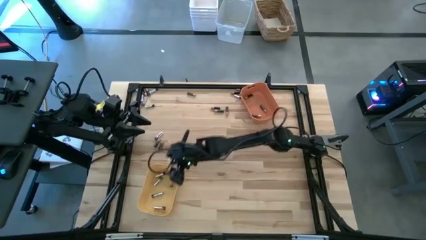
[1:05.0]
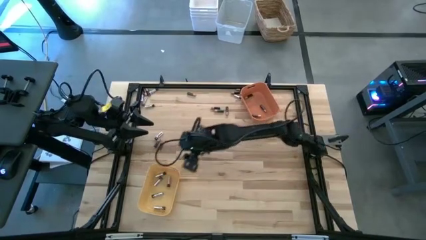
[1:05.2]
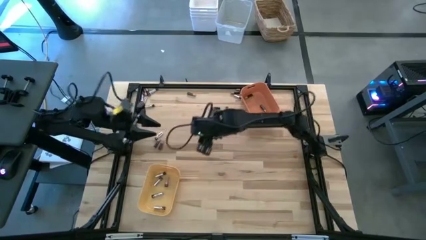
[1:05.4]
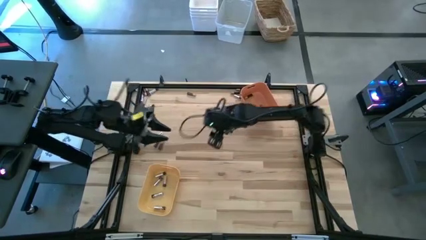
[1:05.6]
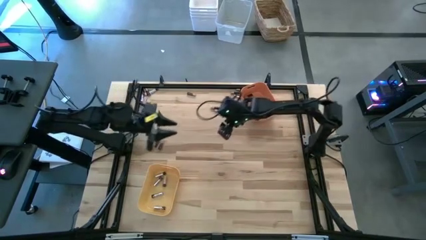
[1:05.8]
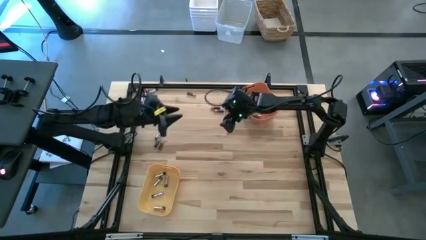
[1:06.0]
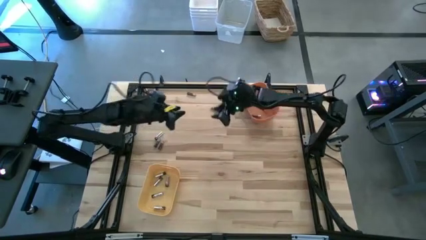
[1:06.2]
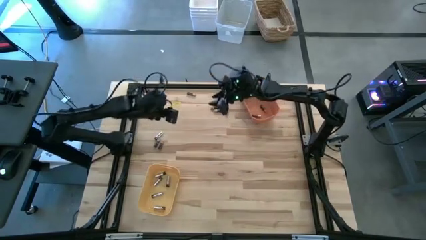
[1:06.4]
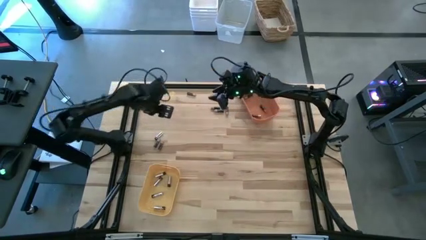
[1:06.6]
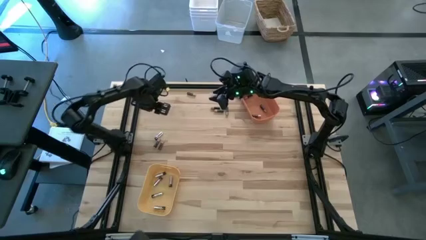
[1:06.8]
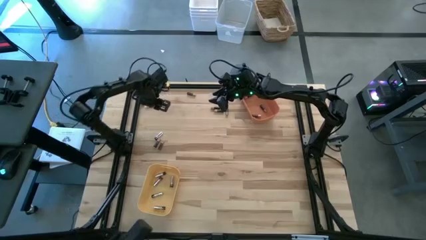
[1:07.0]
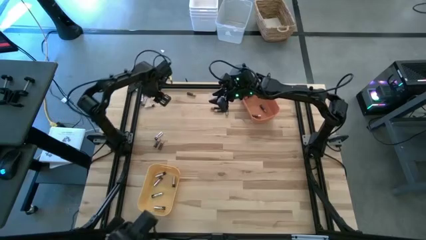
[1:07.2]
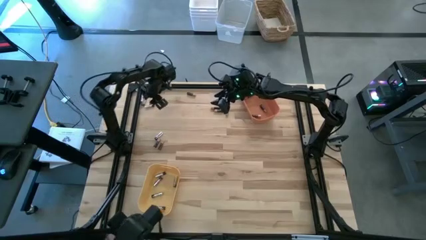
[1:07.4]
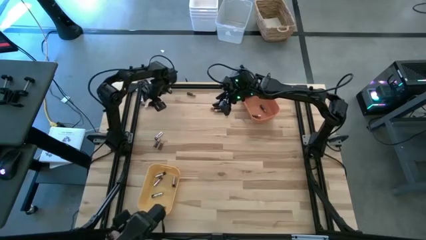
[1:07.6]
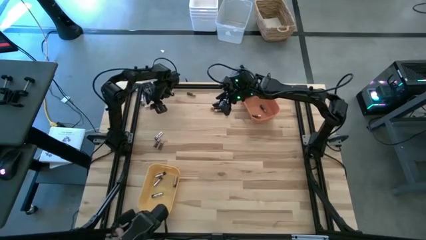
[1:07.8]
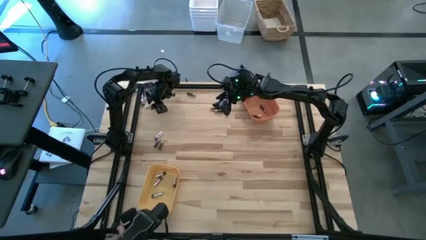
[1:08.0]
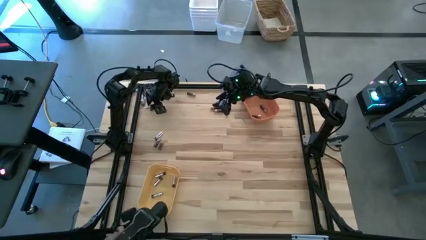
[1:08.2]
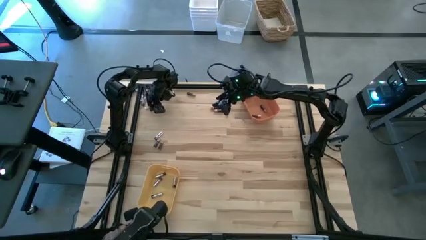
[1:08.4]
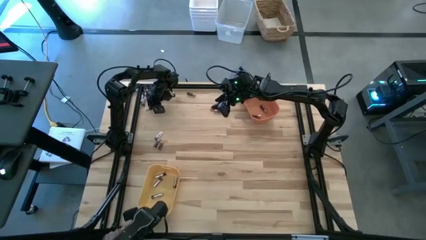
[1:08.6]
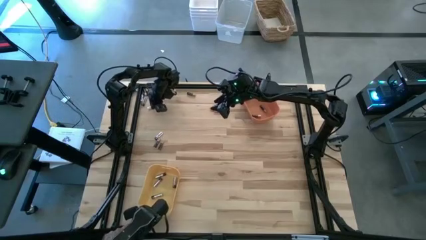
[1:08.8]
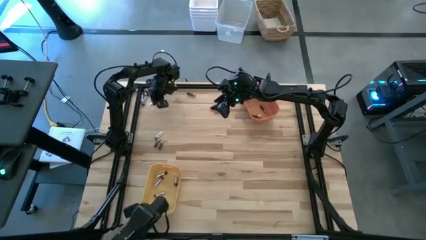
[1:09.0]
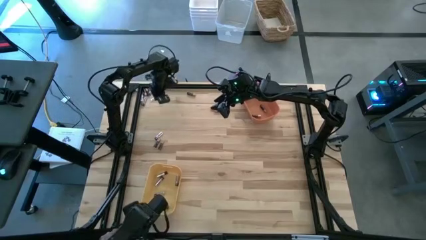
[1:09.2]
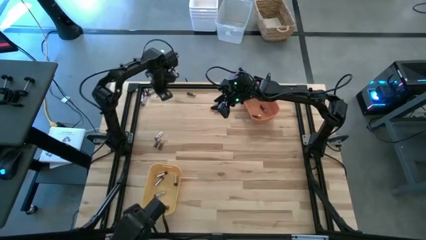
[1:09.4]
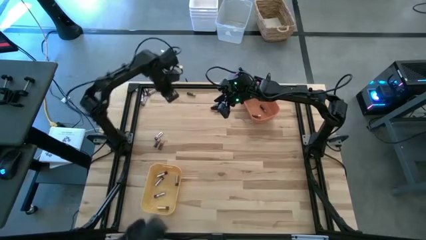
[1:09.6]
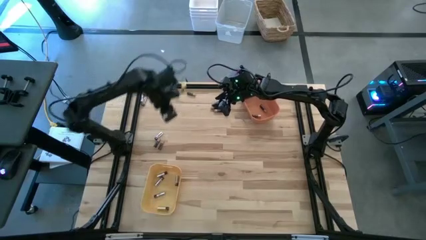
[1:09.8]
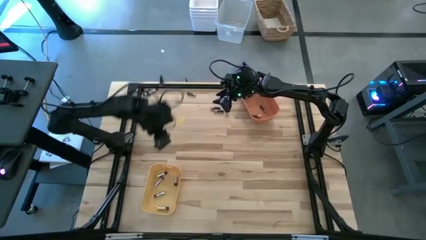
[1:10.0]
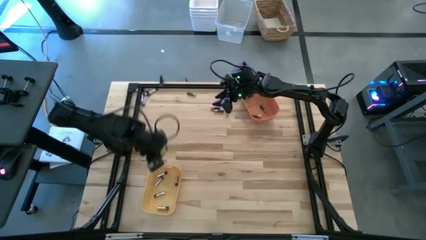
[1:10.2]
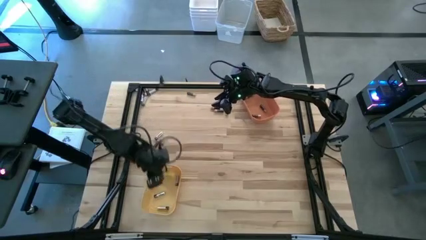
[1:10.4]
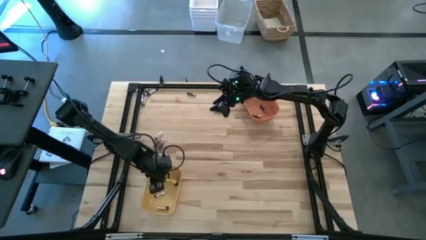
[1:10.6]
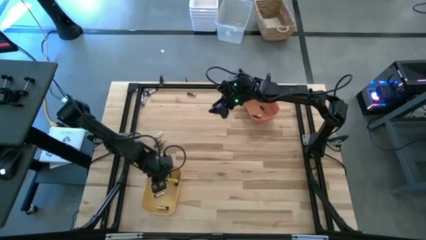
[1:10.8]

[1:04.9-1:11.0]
Task: Sort batteries
Put the silver battery into the yellow bin

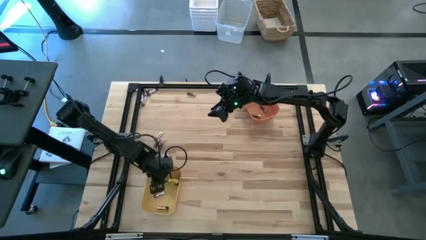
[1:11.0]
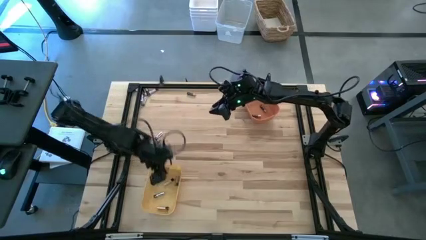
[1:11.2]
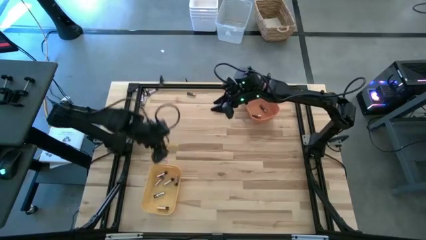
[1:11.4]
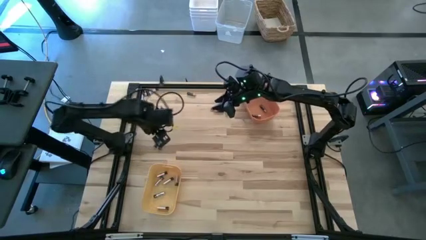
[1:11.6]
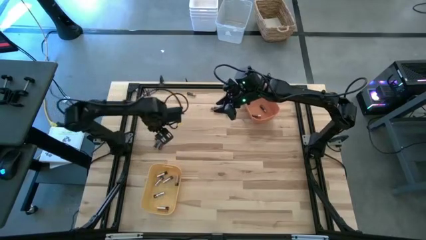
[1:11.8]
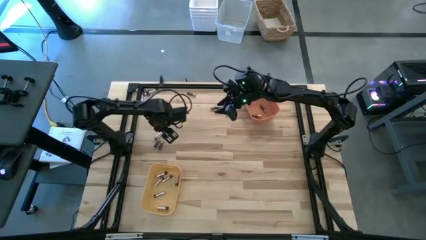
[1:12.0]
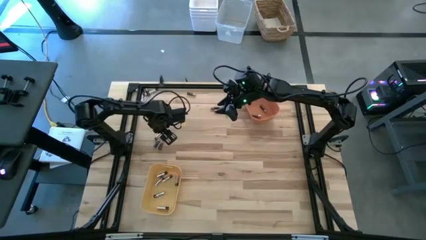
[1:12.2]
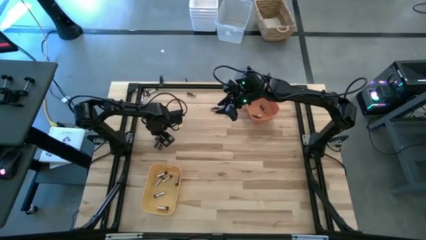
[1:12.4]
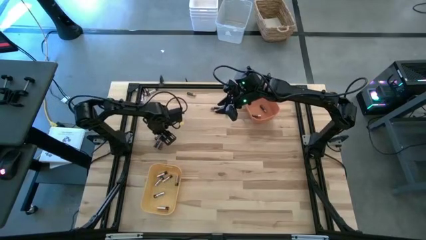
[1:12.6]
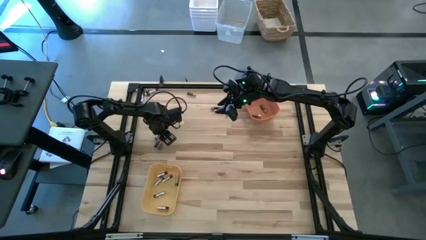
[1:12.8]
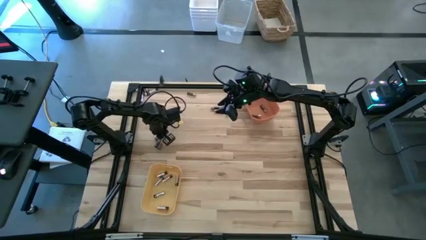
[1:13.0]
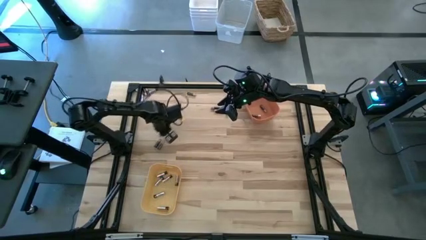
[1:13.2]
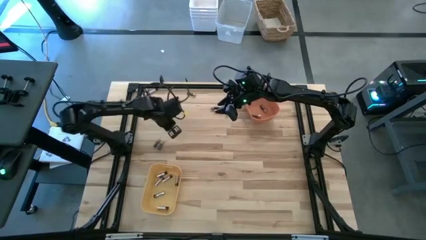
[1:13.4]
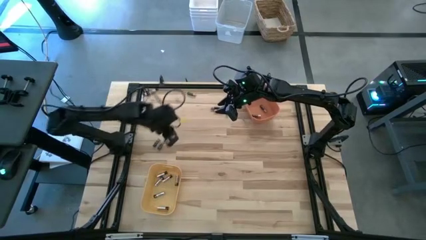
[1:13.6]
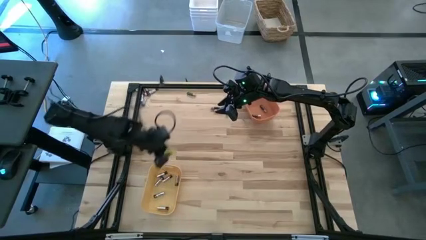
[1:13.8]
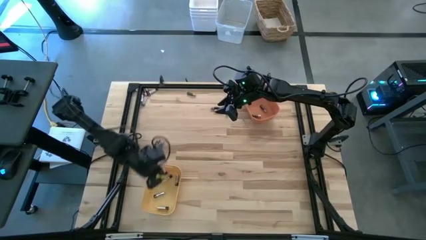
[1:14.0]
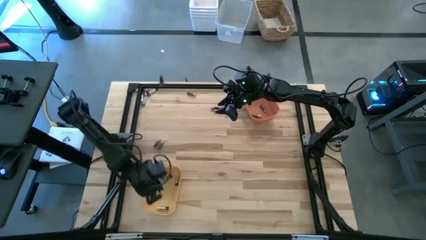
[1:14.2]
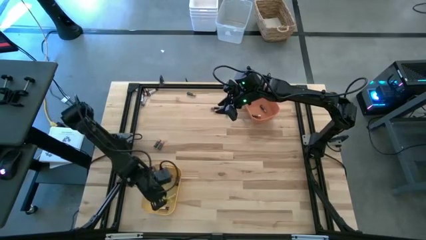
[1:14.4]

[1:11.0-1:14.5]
Put the silver battery into the yellow bin

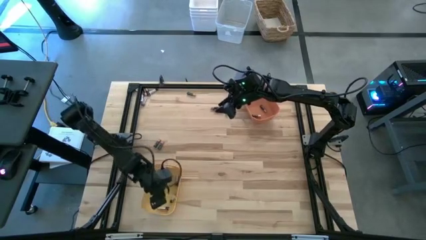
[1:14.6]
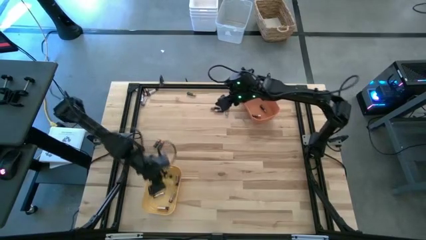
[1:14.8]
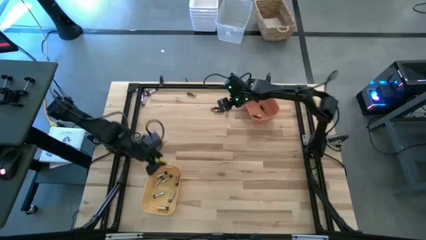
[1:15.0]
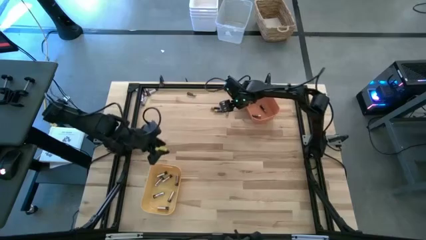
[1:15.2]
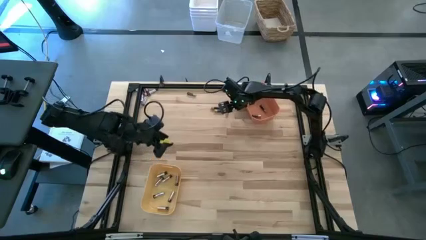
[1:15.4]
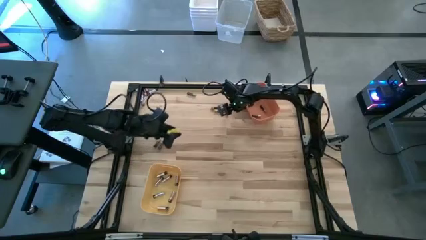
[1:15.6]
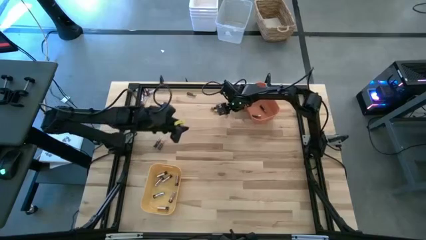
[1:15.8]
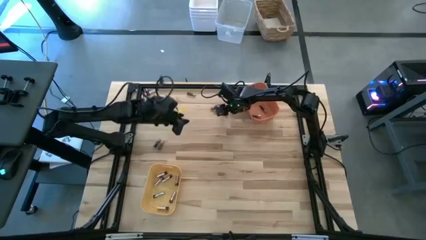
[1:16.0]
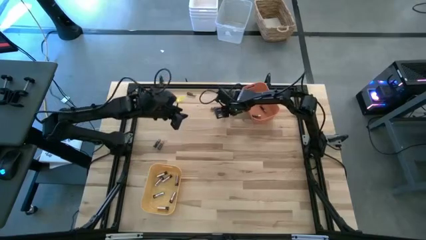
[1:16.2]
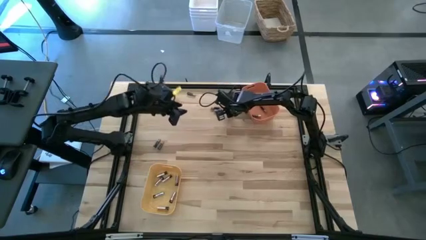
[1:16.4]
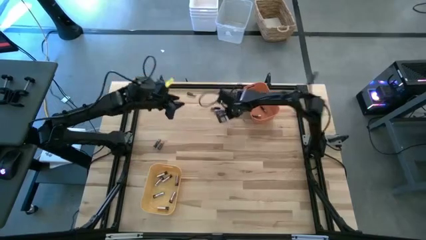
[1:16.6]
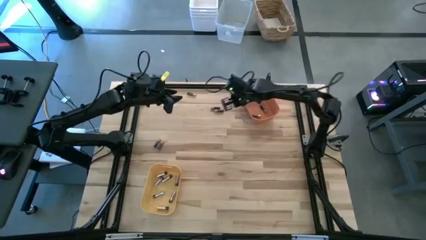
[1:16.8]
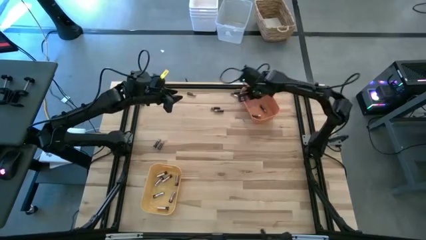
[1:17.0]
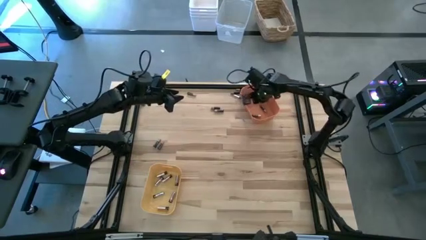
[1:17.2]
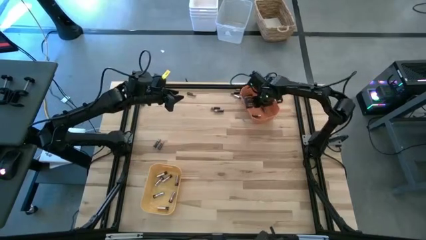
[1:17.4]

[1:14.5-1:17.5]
Put the black battery into the orange bin

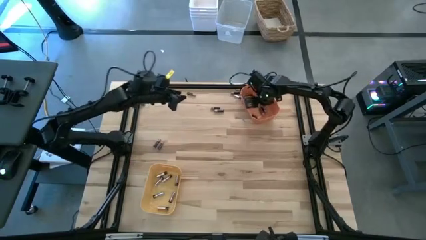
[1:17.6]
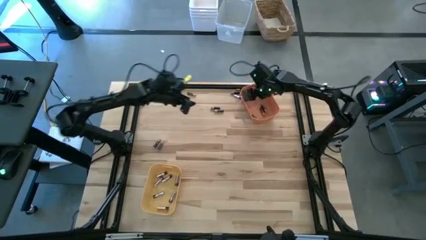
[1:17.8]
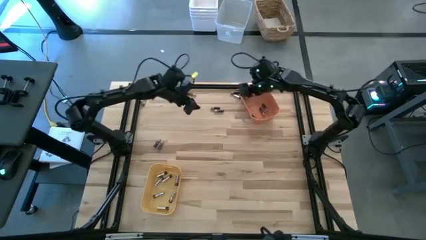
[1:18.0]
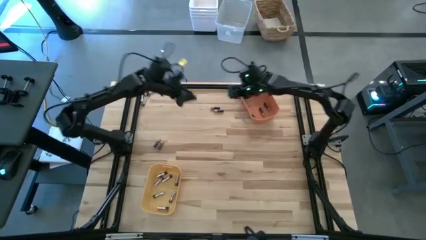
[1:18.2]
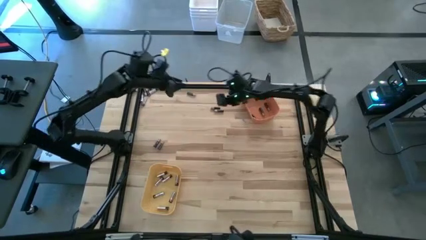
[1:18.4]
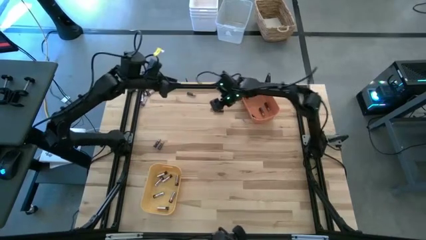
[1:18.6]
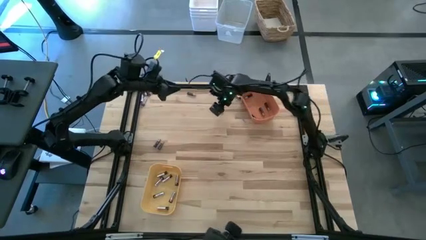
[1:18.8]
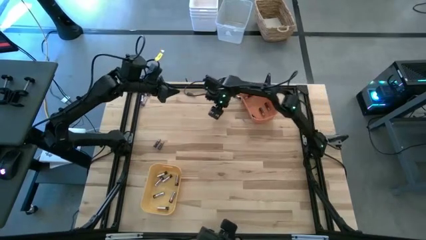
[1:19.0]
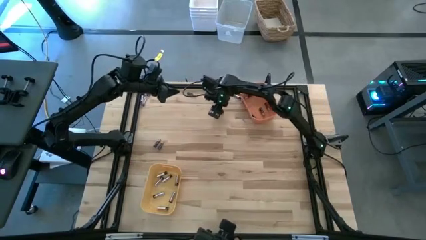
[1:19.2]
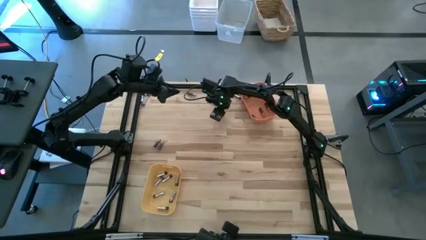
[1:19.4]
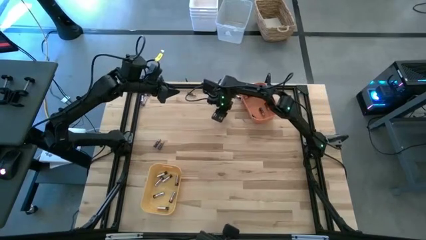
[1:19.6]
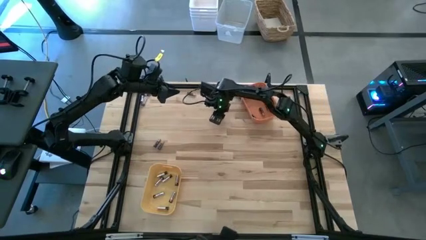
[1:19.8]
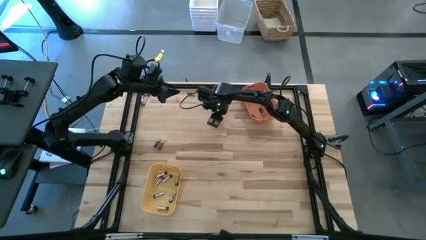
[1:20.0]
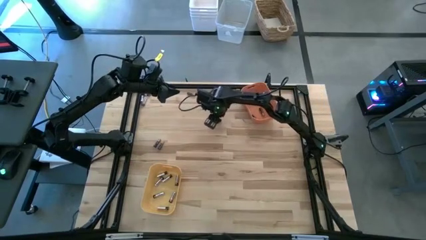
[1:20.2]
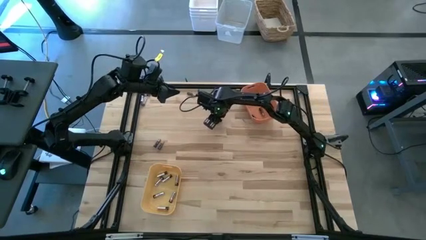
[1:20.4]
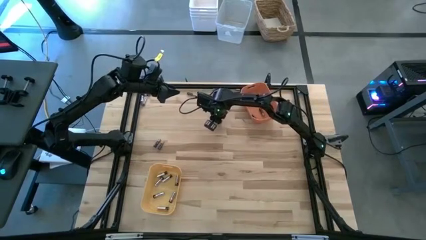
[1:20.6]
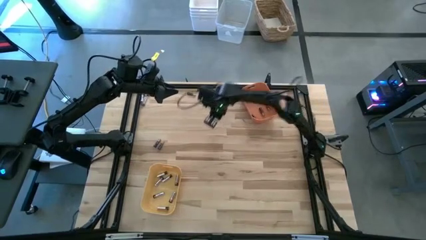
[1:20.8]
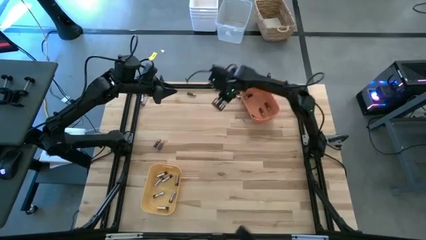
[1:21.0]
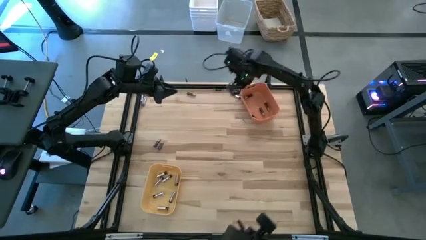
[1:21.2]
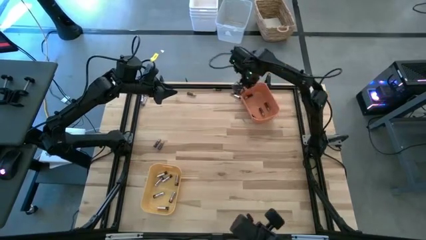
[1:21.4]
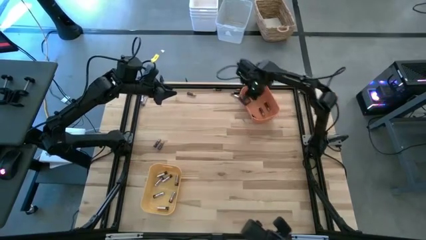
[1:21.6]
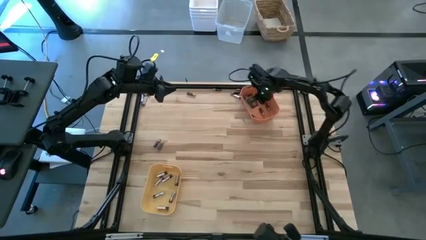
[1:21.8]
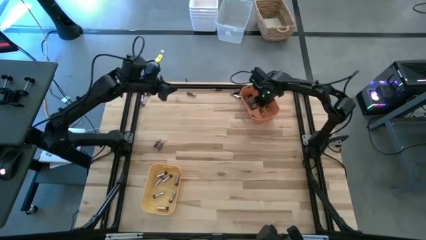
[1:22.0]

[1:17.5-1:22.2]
Put the black battery into the orange bin
